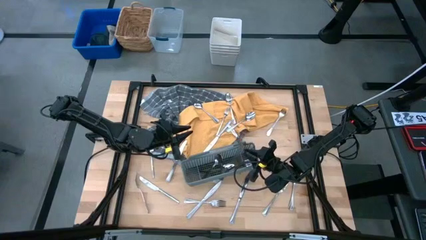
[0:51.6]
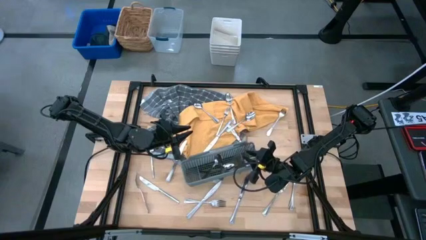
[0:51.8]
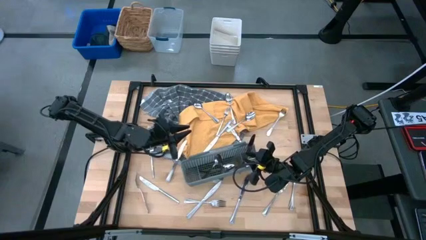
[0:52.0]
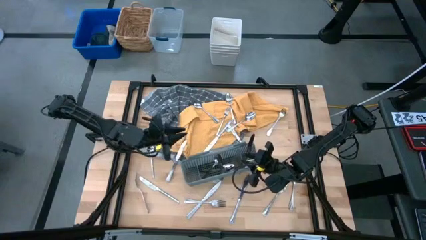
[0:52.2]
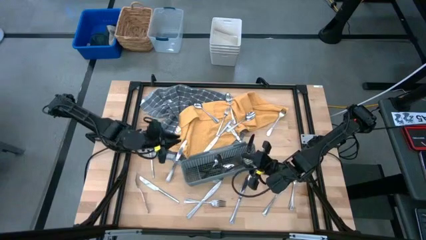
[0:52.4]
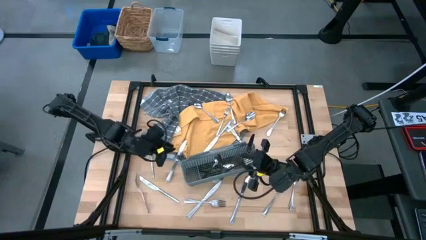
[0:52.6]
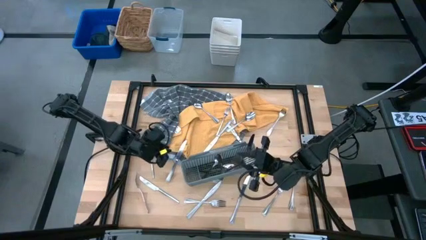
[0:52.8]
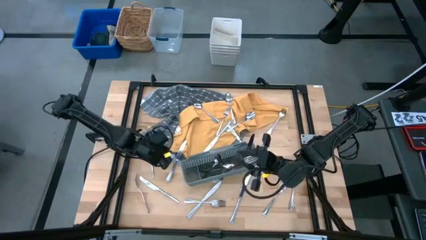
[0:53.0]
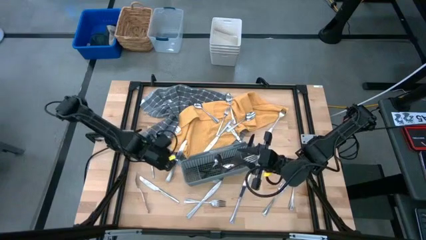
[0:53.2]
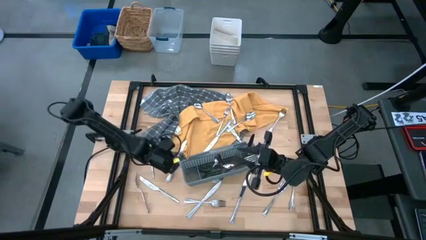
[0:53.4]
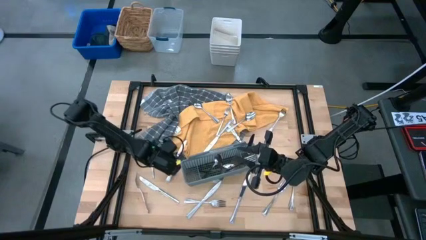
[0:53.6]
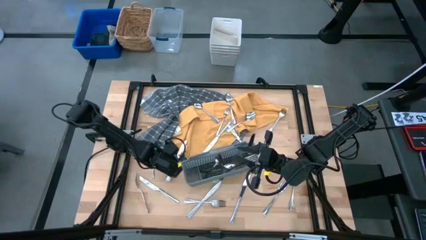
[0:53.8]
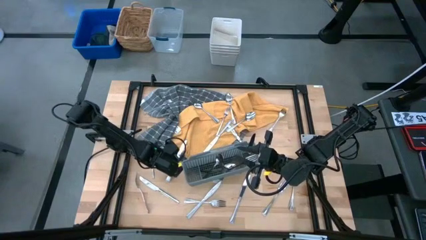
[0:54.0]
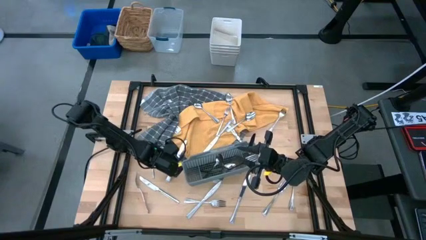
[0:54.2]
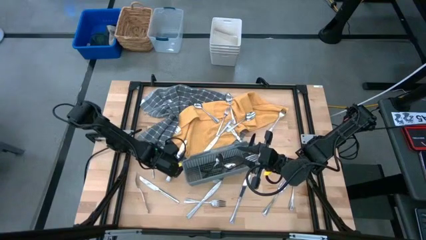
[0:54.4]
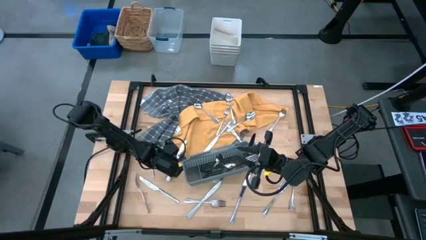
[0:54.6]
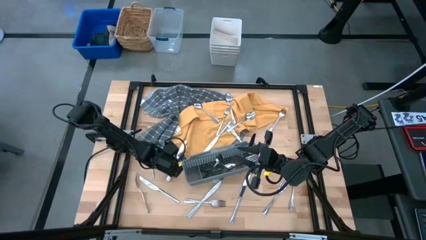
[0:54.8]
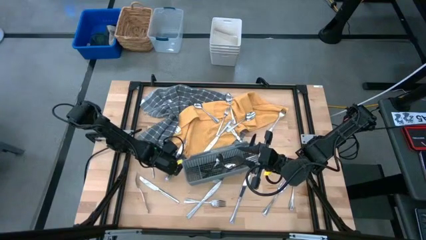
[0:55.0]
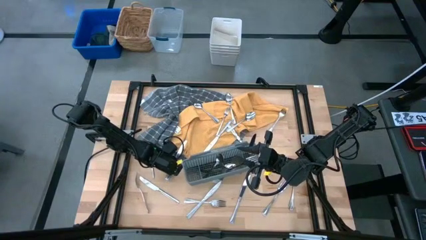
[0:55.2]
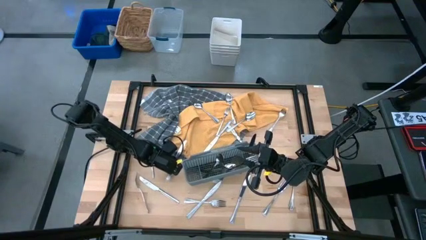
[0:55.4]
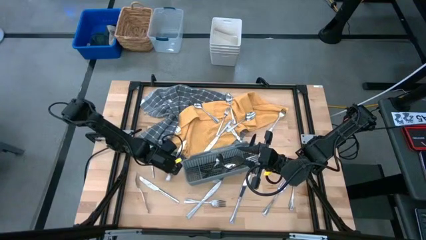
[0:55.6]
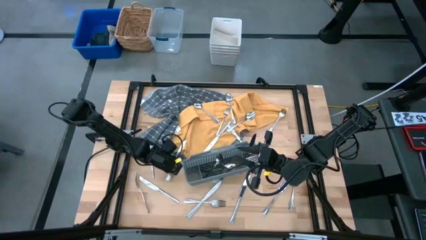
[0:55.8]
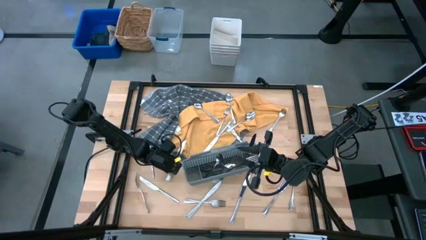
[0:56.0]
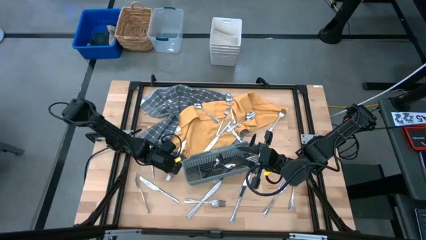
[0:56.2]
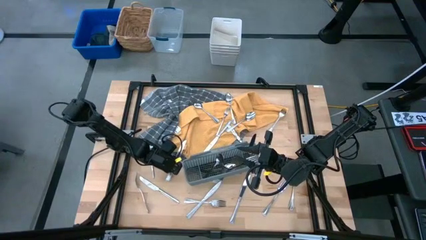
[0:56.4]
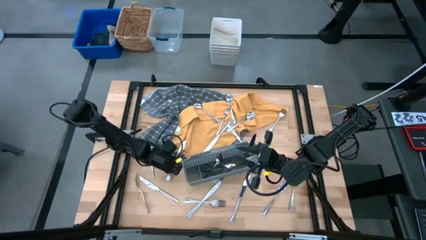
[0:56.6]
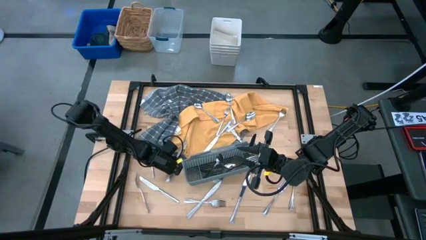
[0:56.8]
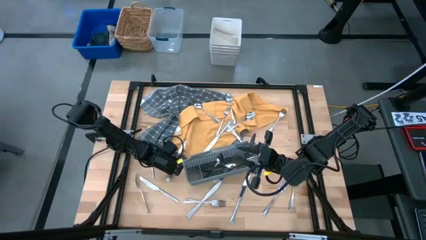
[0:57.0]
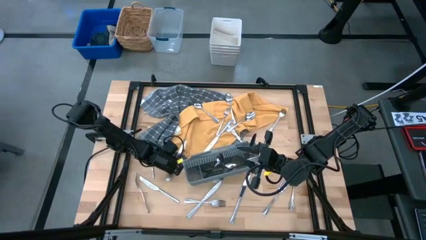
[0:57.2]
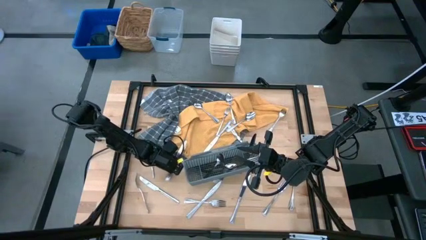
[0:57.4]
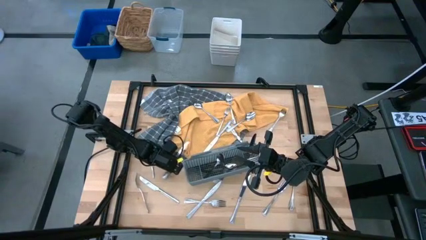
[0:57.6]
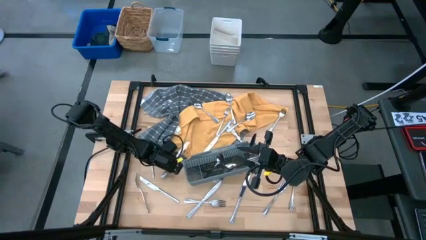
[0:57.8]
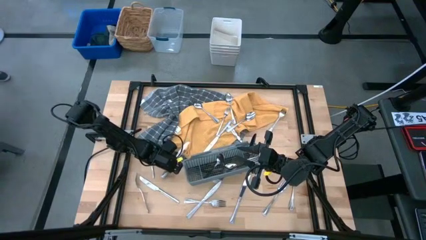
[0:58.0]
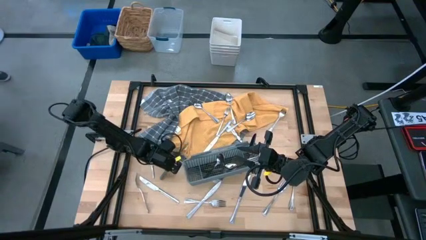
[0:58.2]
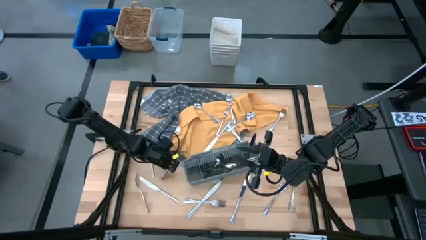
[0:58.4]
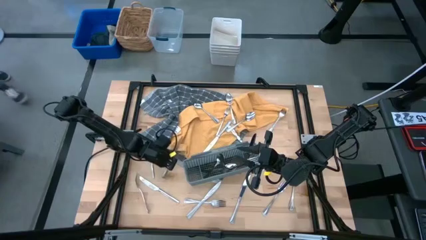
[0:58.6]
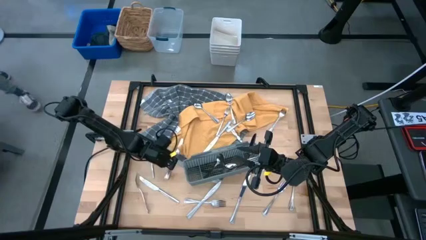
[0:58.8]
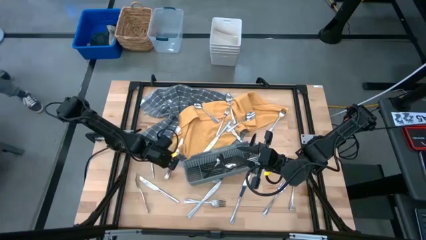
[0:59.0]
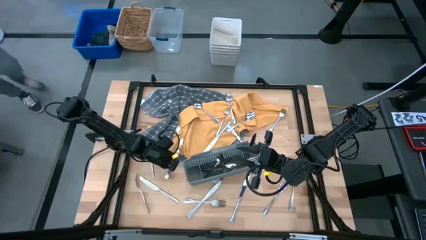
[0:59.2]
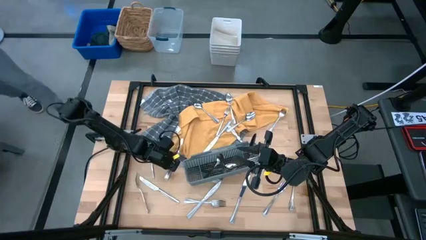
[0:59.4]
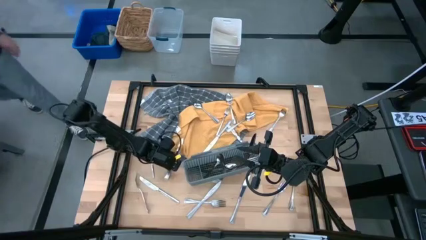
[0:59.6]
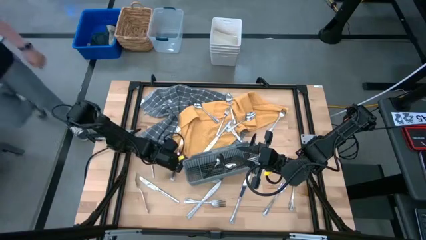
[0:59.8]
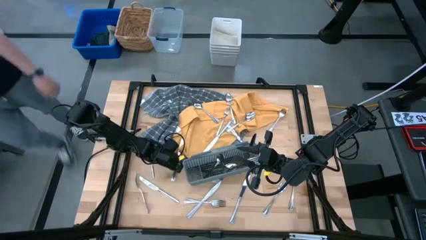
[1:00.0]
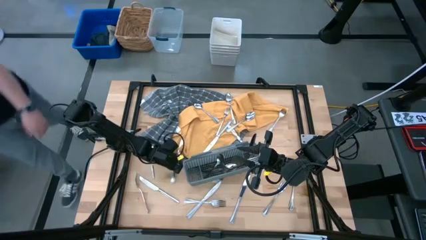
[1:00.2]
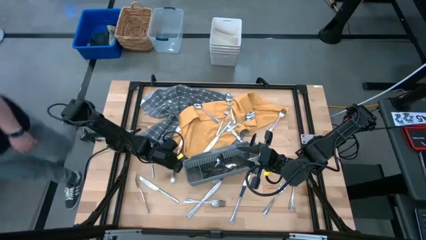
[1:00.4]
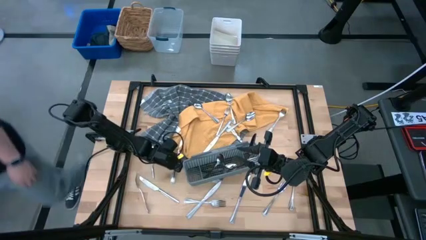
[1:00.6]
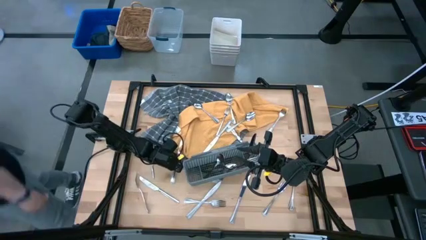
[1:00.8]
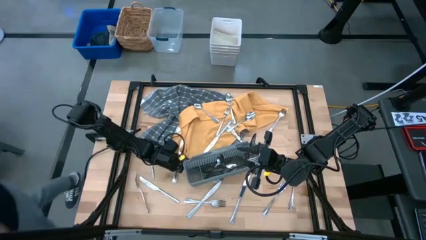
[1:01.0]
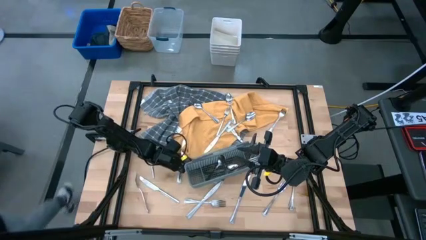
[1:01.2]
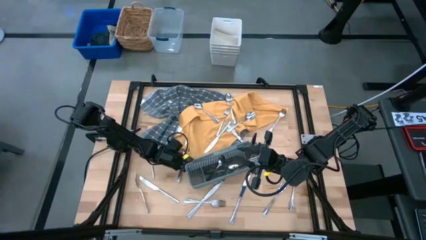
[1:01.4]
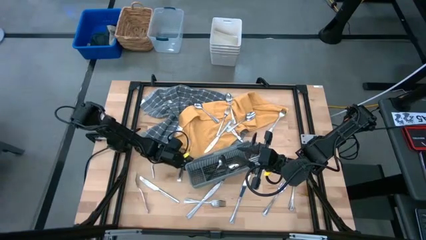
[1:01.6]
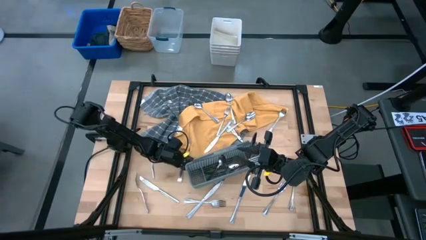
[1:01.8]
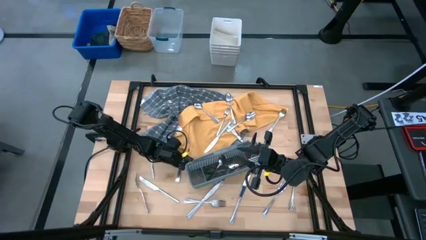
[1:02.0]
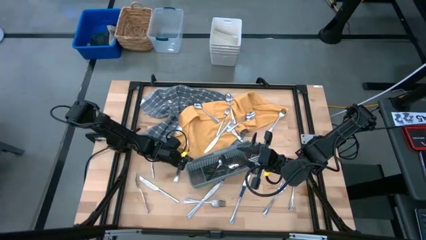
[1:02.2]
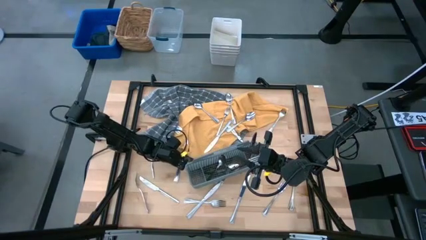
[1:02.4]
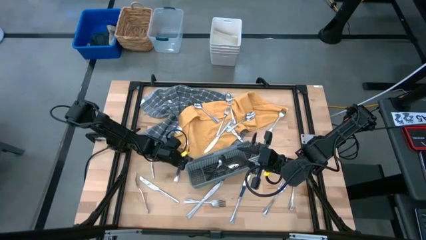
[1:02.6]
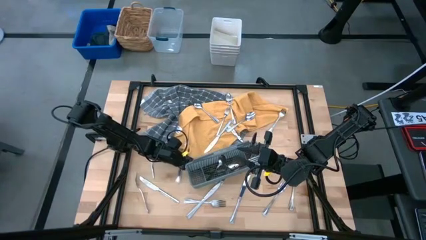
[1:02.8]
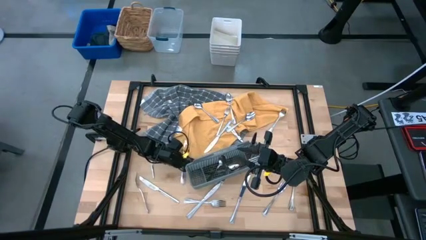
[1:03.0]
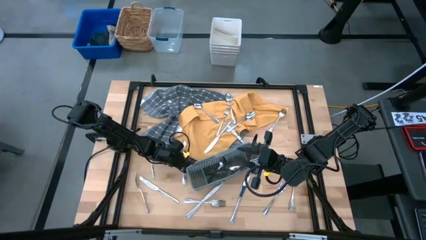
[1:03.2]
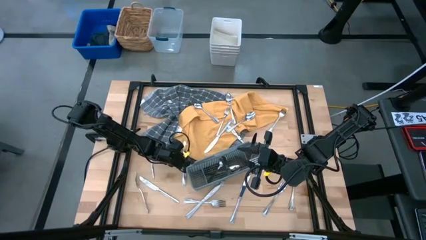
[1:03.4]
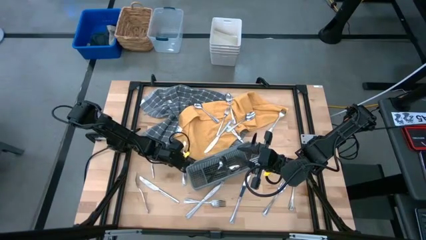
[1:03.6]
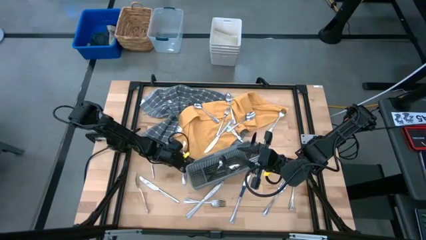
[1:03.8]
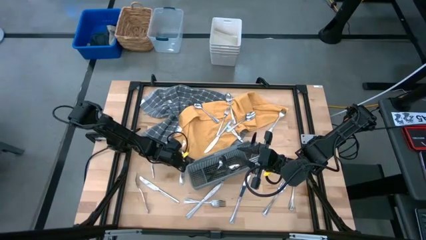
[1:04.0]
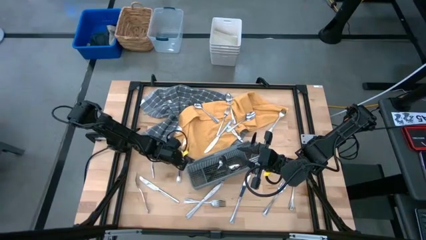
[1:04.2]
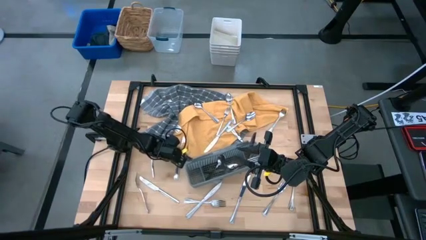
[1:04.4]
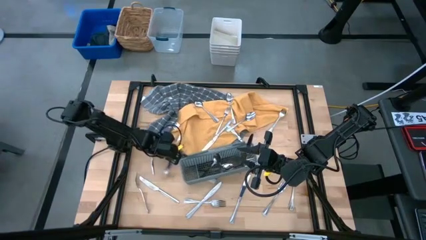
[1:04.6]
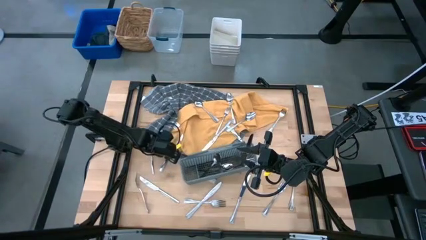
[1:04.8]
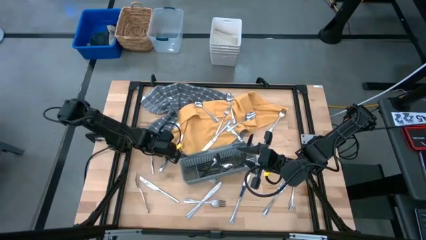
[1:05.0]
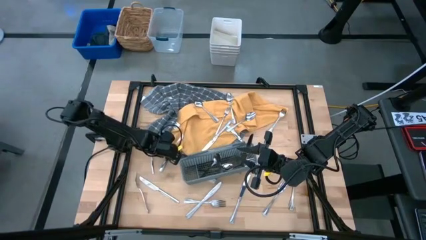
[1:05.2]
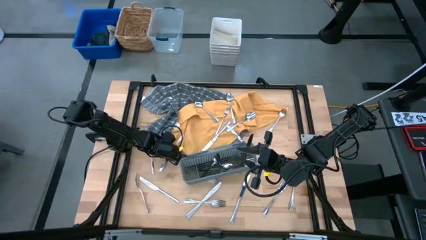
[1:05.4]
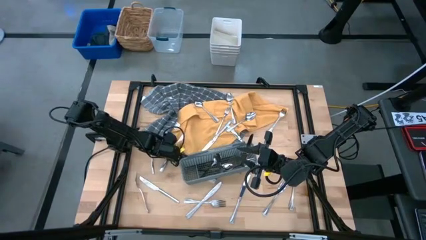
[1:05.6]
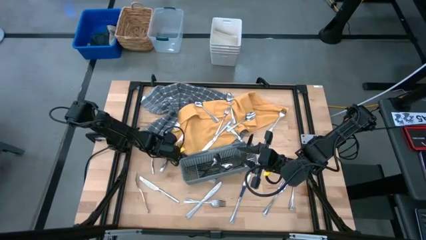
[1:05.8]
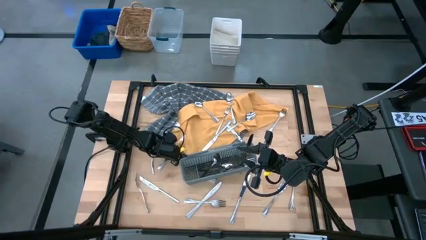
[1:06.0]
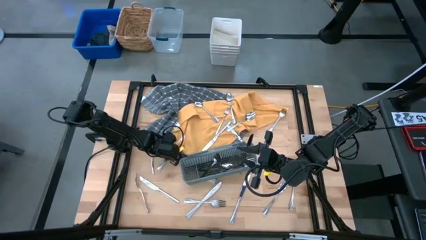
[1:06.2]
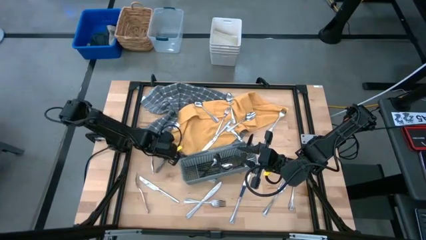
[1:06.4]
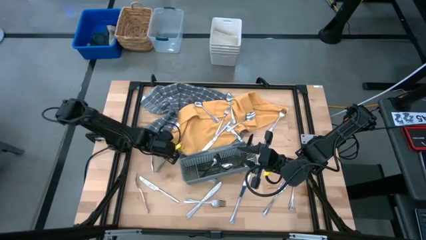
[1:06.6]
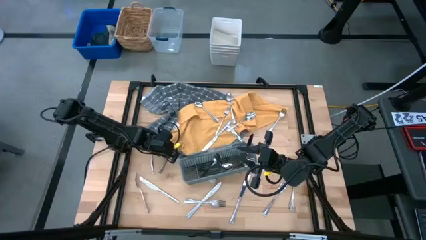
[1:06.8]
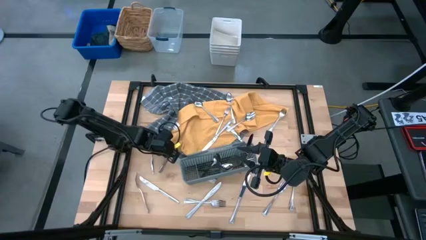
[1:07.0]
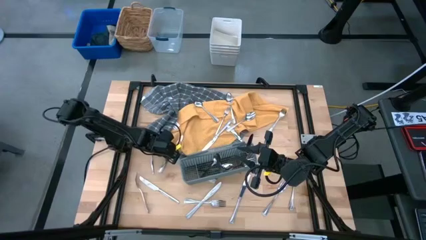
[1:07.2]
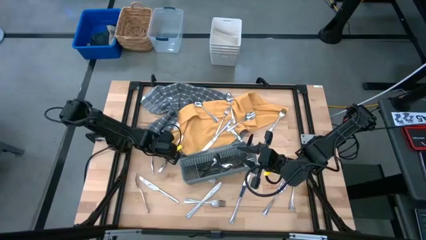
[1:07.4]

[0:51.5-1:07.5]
Task: Sort silverware
Put the silver knife into the gray silverware basket
